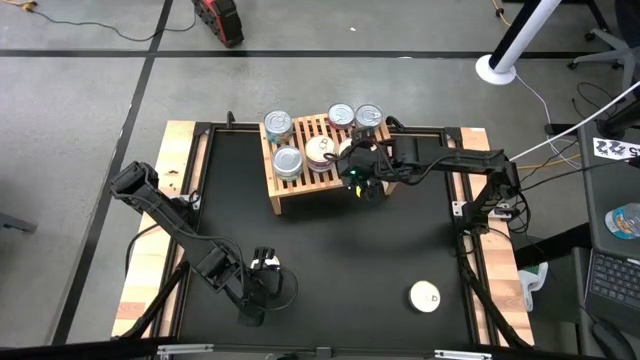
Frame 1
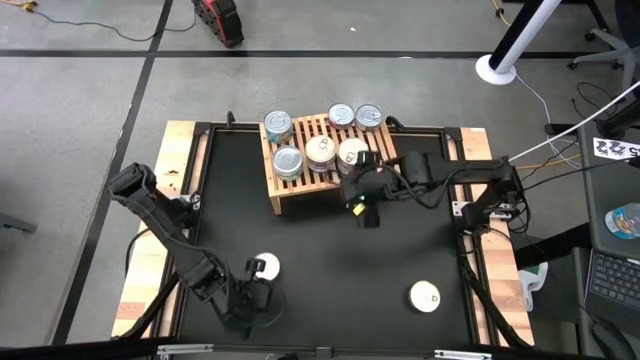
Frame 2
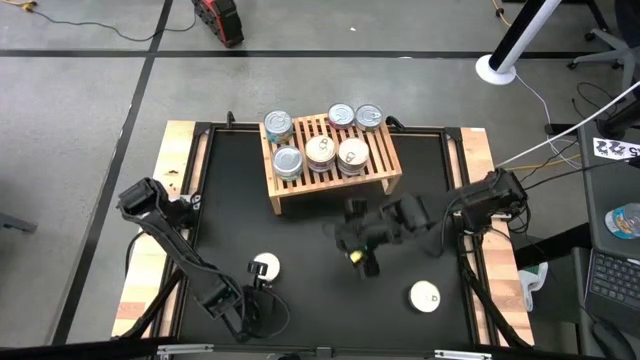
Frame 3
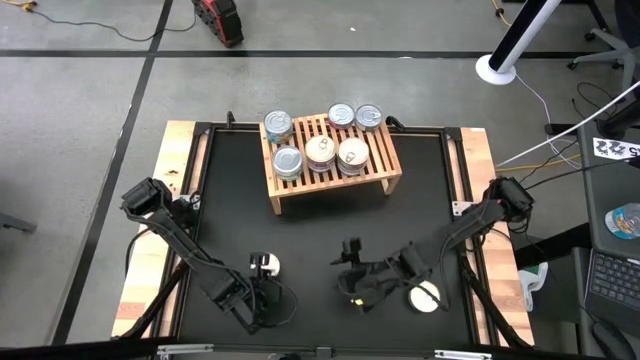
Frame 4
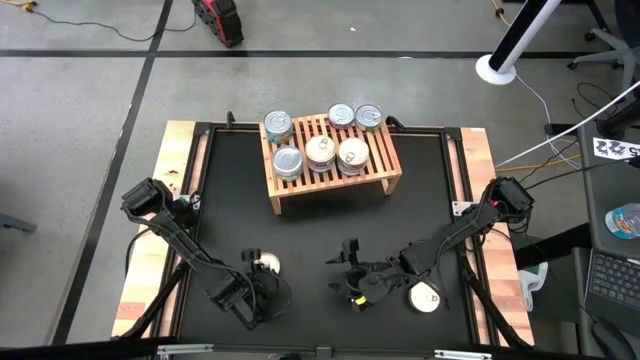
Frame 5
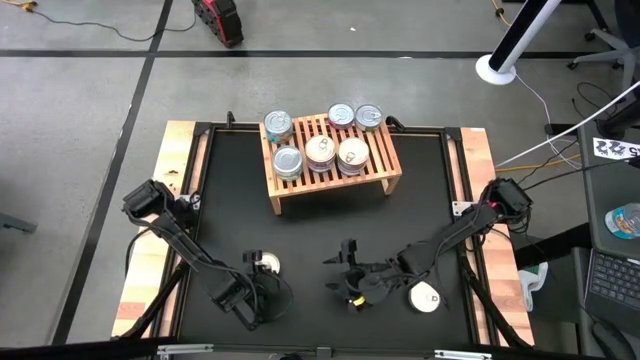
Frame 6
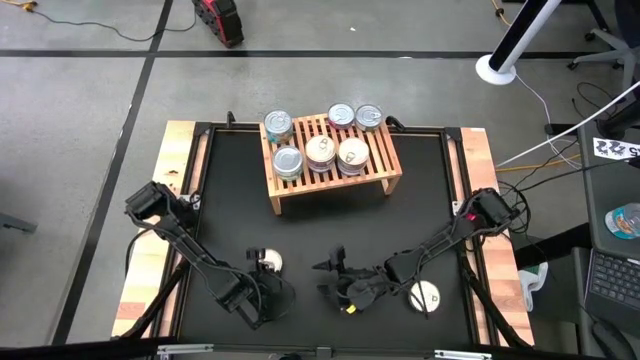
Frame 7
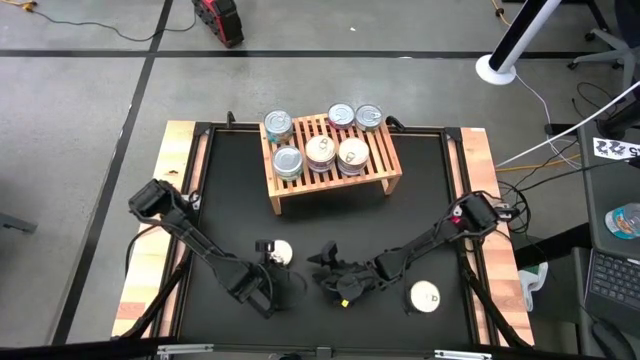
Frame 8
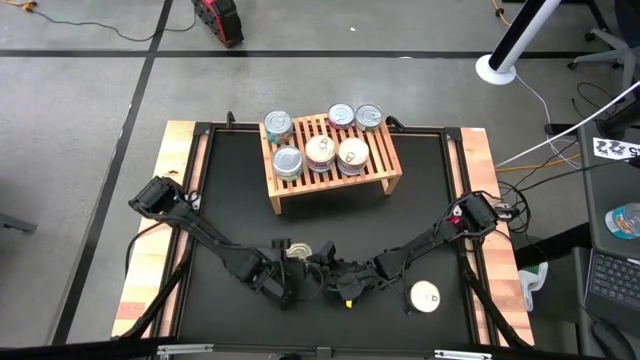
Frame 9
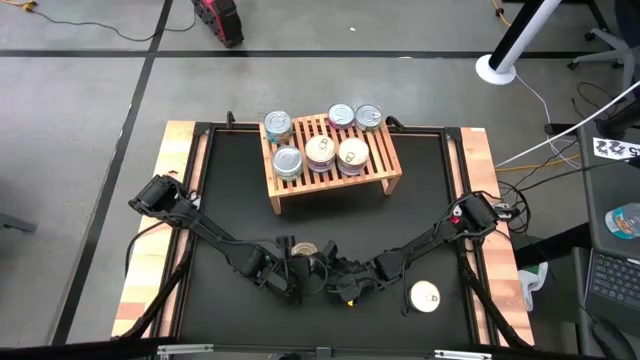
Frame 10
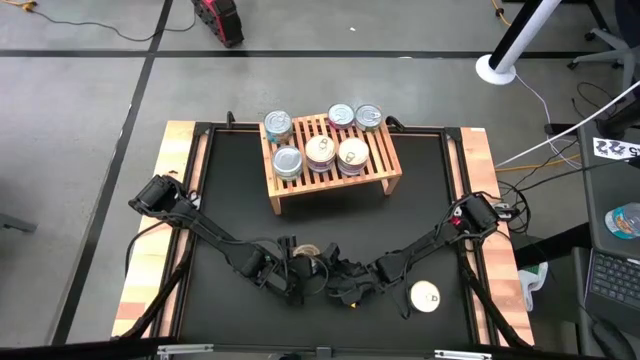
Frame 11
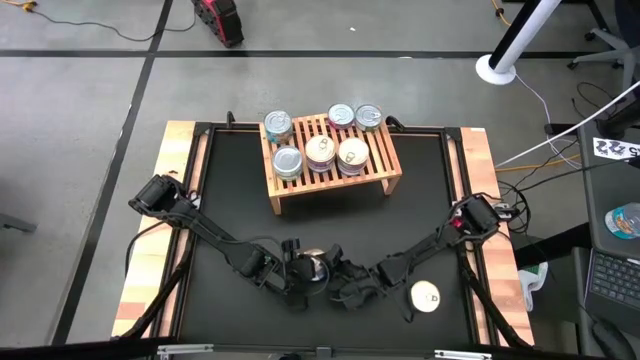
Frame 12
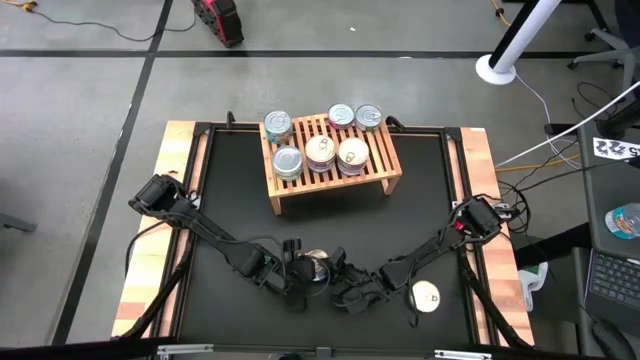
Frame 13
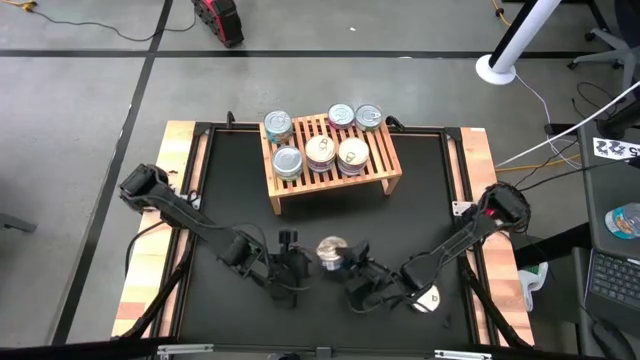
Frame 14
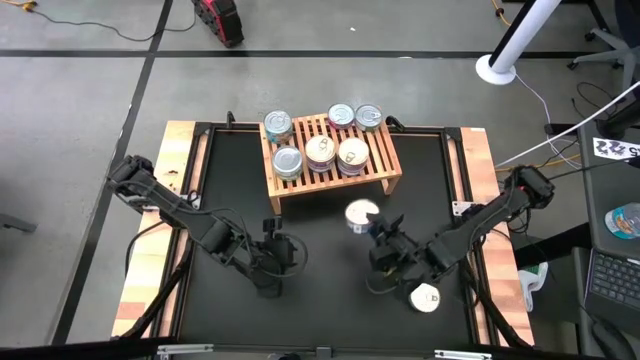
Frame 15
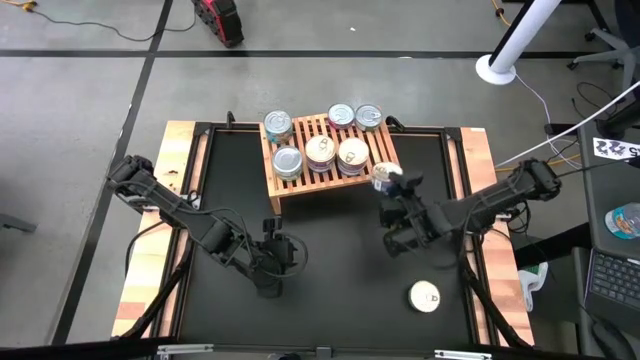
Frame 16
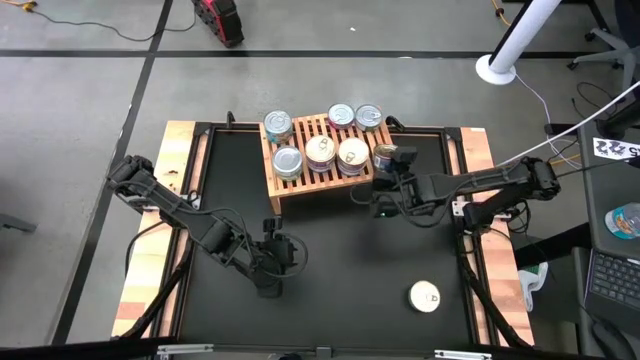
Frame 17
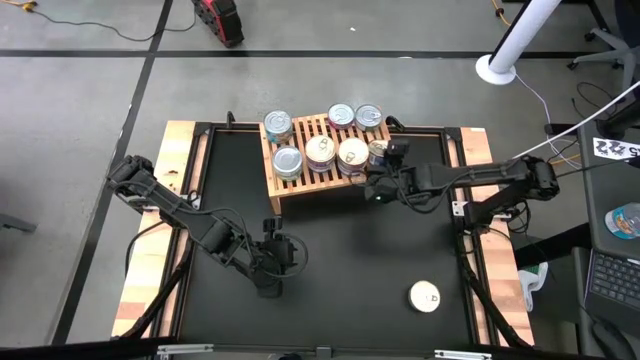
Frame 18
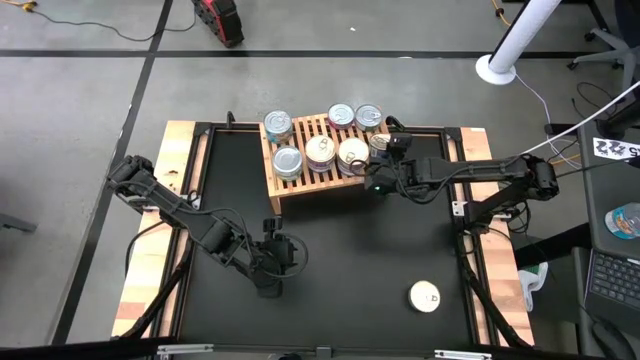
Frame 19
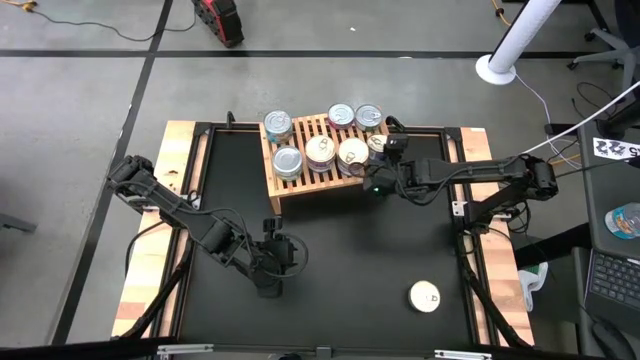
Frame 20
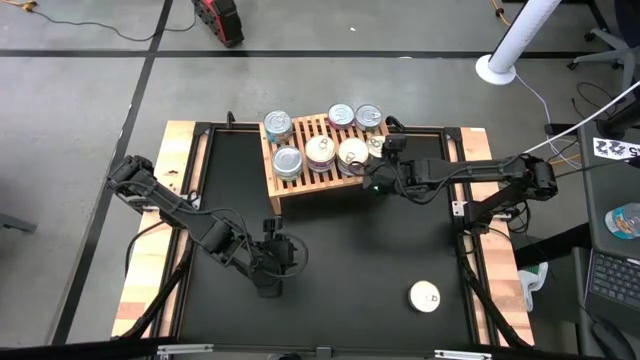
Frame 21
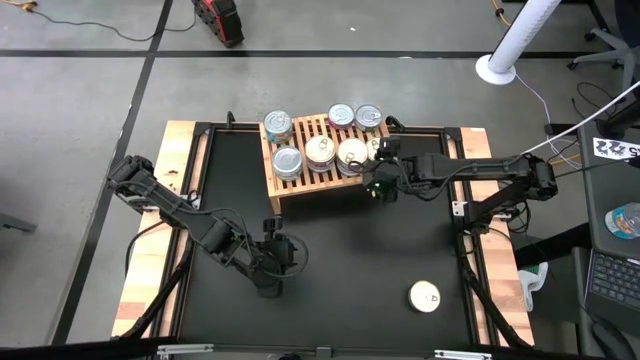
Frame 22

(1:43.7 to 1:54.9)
Task: Stack canned seafood by type on shelf
Put the blue tuna can on the shelf

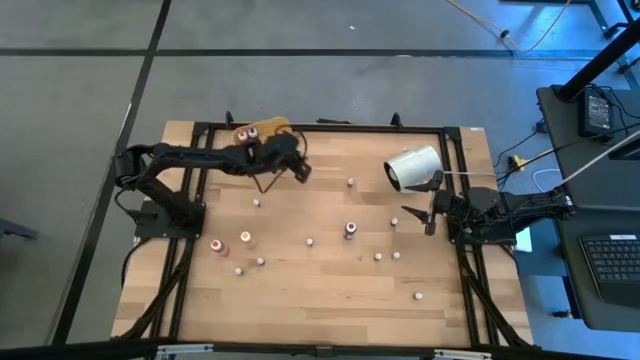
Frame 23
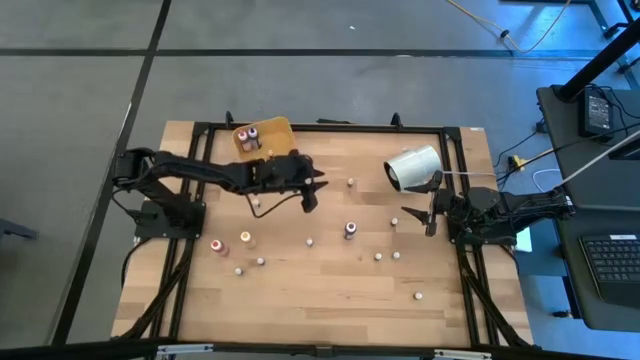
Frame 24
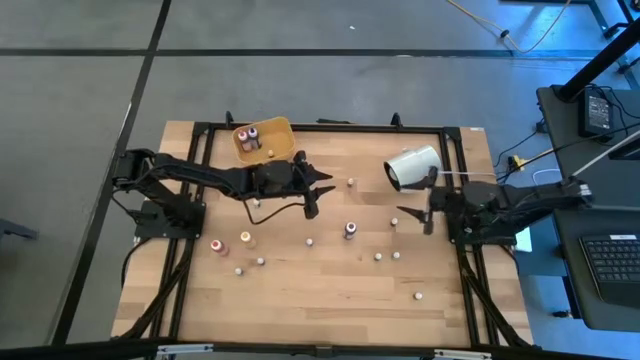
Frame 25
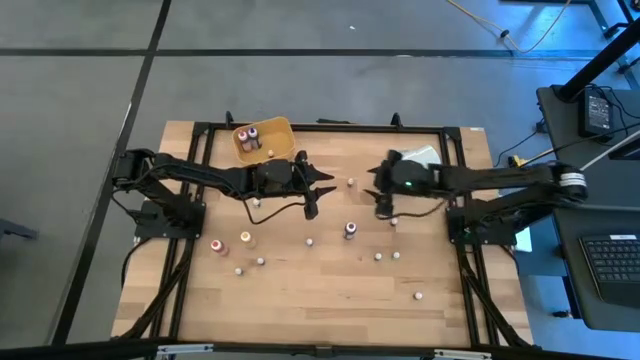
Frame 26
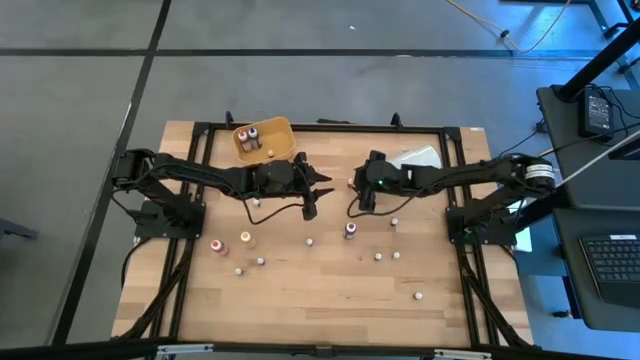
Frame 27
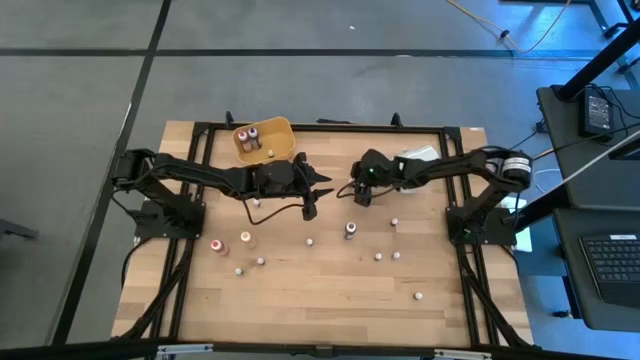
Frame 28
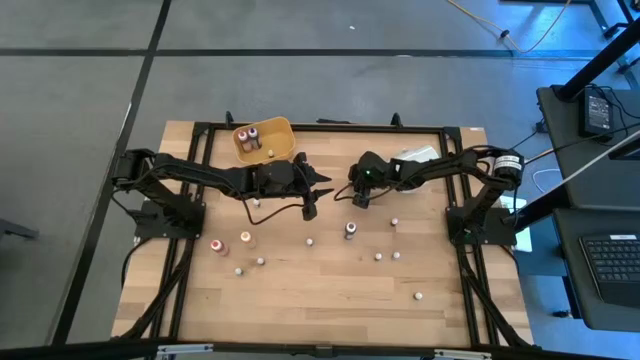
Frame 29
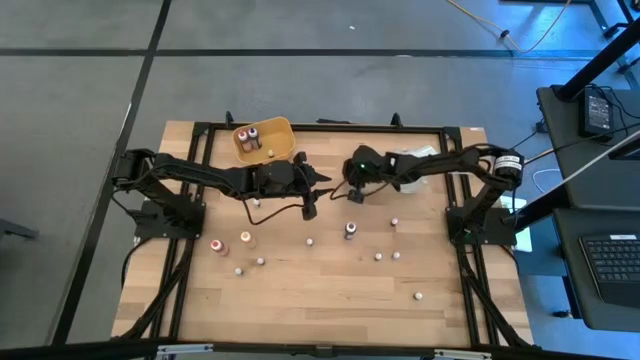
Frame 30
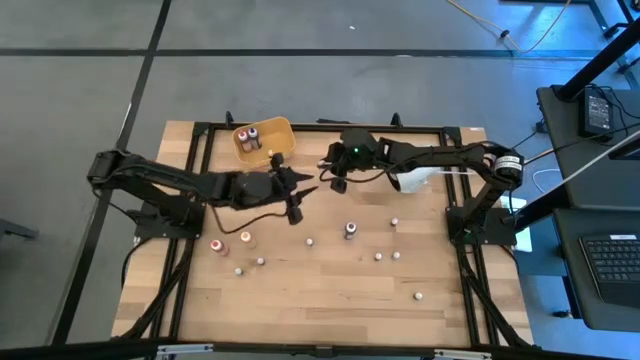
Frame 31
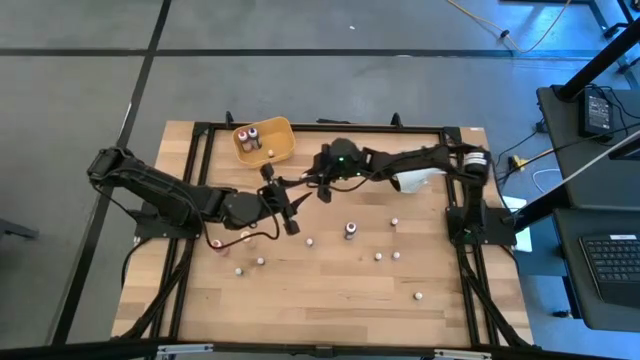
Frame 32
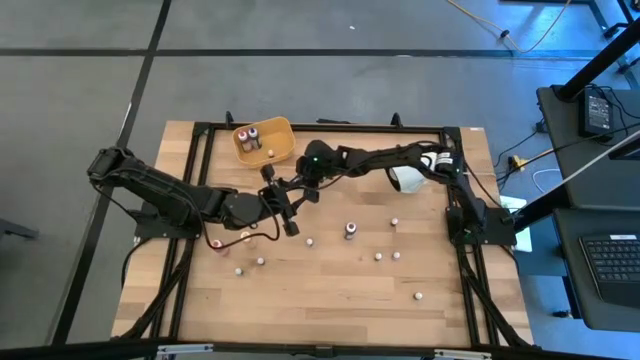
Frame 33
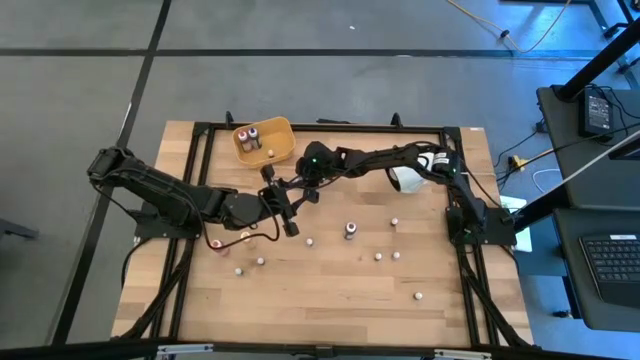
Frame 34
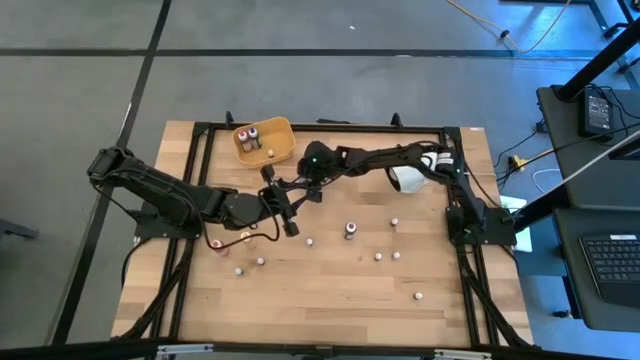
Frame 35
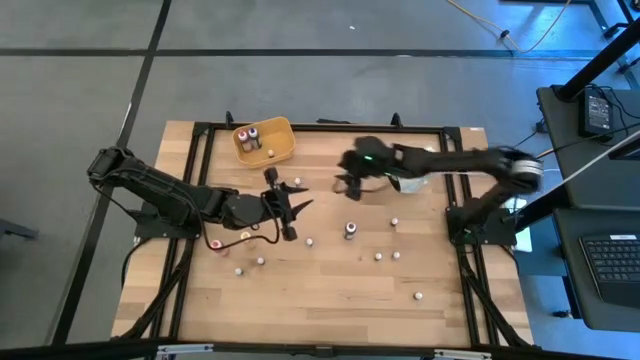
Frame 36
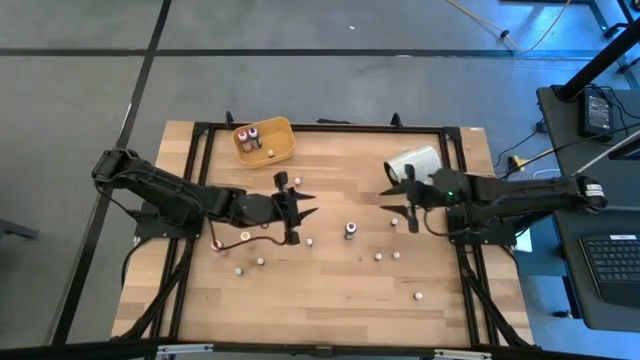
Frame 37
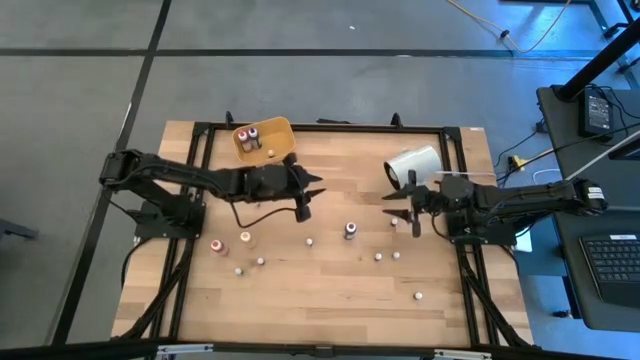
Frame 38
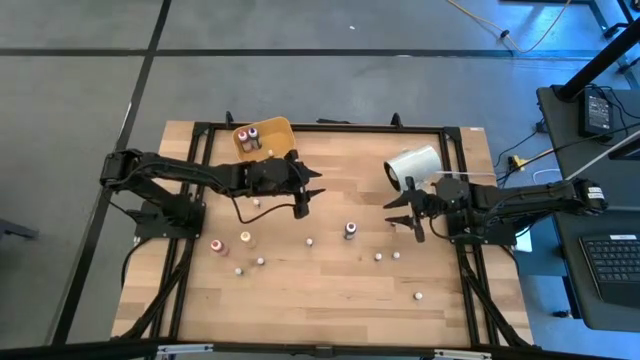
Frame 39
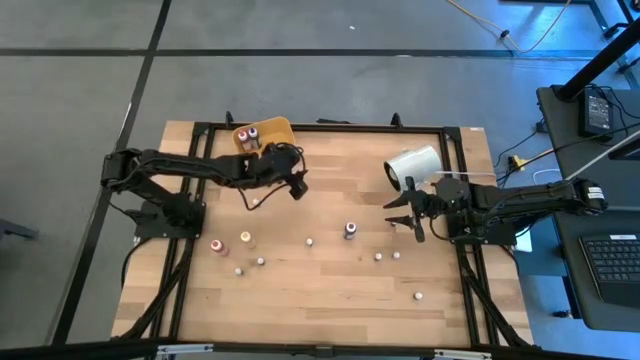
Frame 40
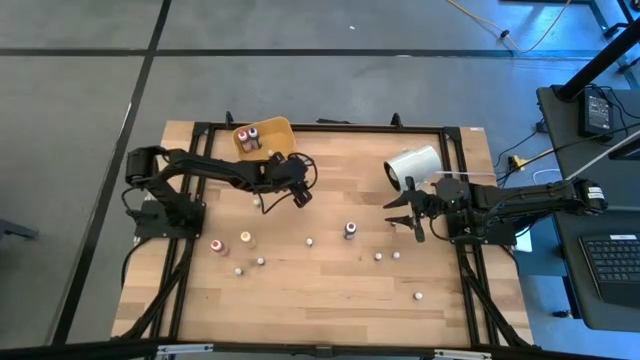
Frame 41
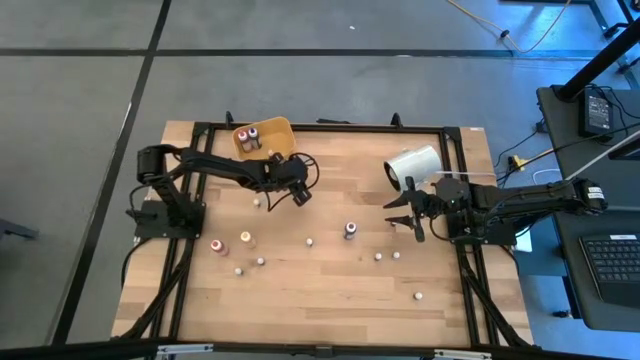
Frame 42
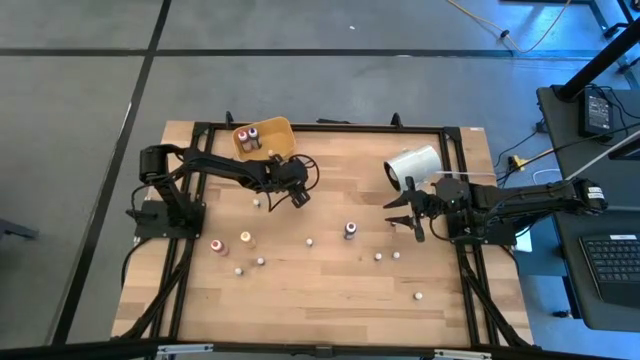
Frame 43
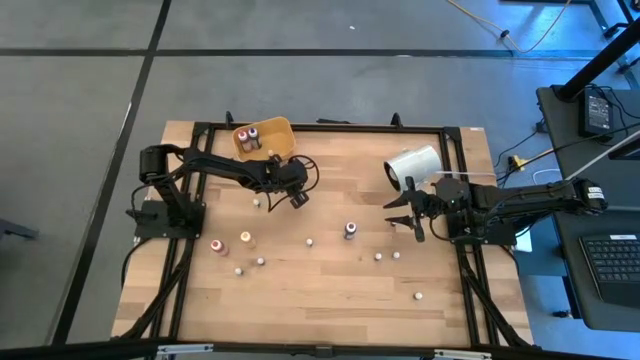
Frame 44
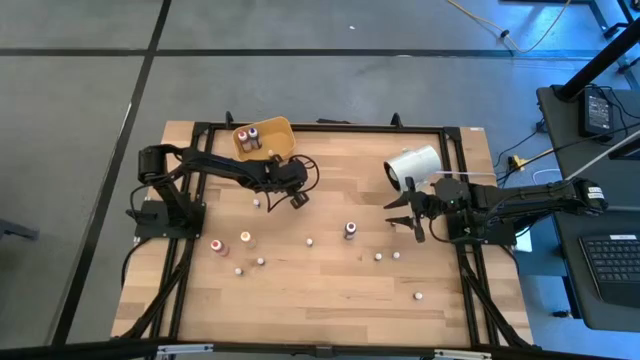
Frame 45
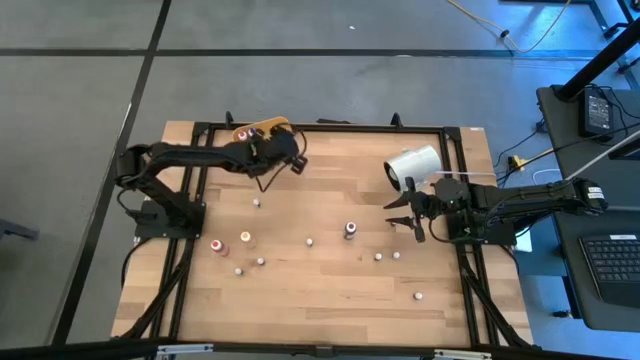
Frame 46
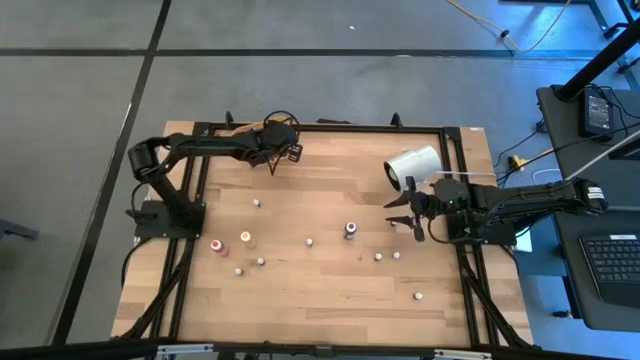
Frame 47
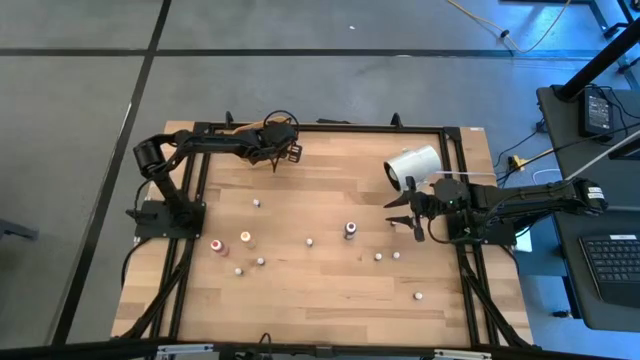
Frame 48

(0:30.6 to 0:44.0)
Task: Pick & Place food coloring
Put the top small red food coloring bottle into the yellow bin
